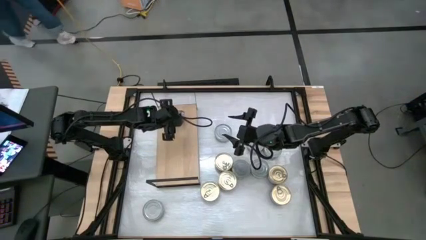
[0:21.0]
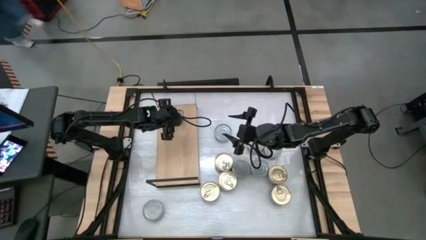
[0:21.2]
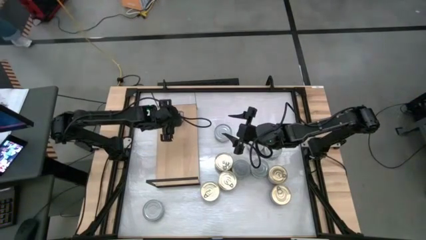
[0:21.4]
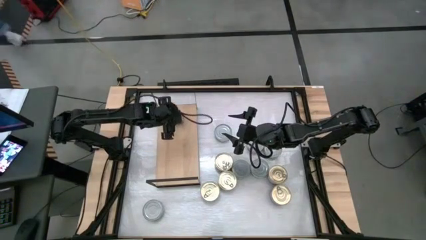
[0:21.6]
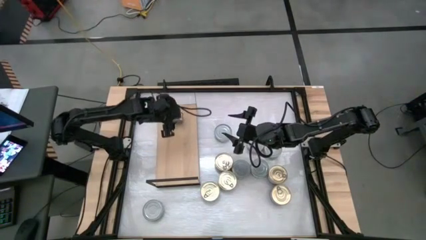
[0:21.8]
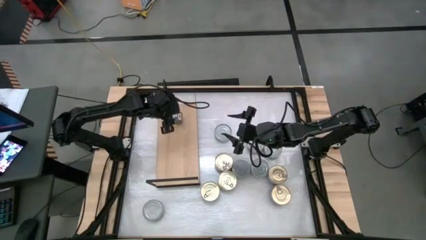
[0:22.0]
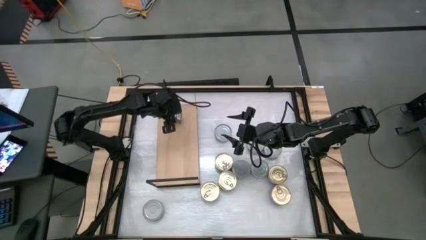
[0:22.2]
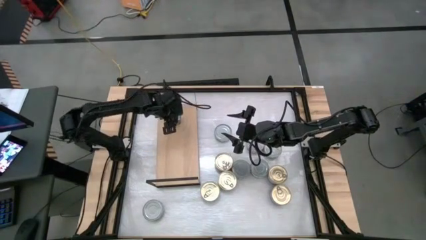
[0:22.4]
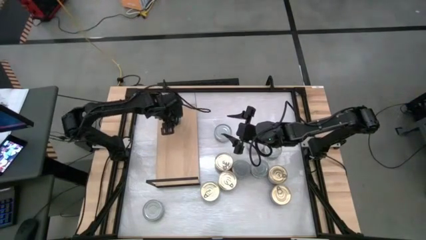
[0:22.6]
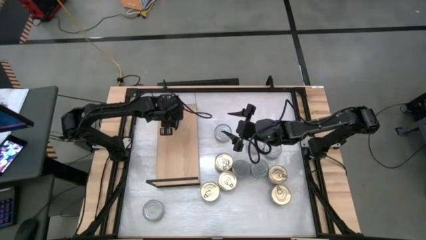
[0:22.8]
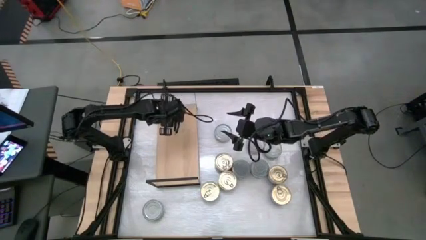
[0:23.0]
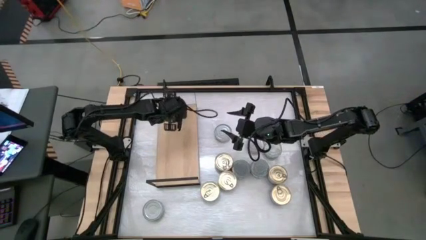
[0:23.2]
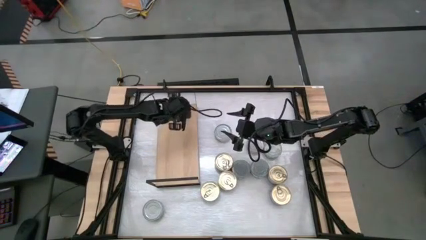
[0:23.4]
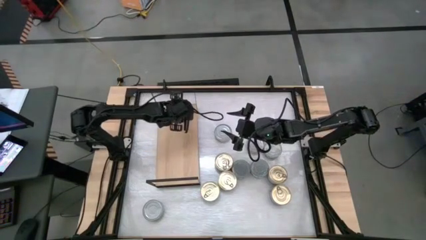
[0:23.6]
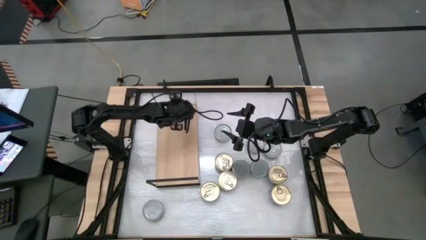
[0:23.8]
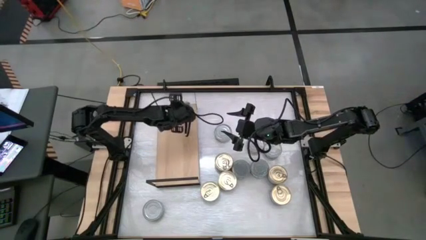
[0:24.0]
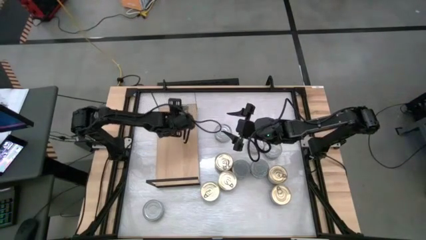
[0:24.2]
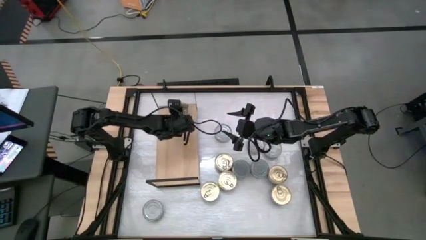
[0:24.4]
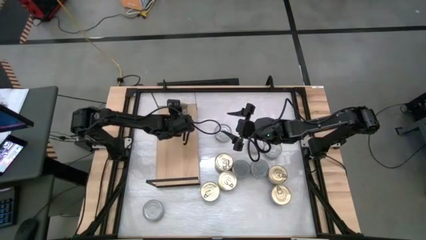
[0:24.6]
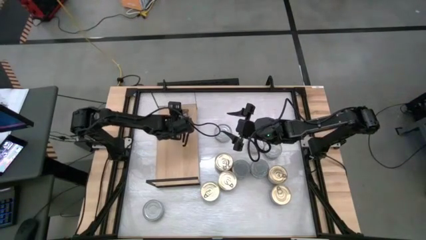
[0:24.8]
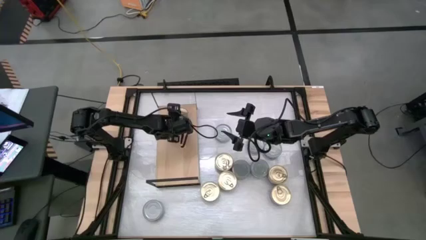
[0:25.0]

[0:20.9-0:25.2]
Task: Stack canned seafood by type on shelf
Put the blue-pink tuna can on the shelf

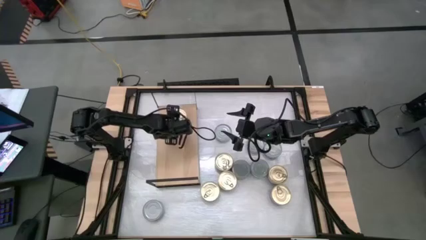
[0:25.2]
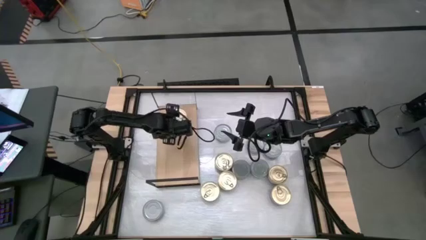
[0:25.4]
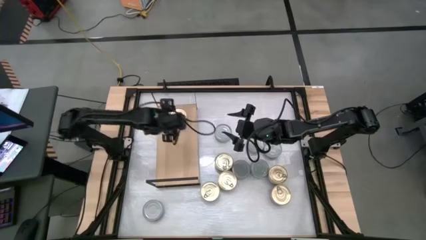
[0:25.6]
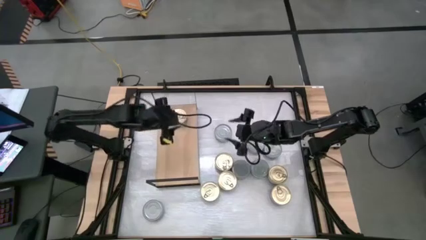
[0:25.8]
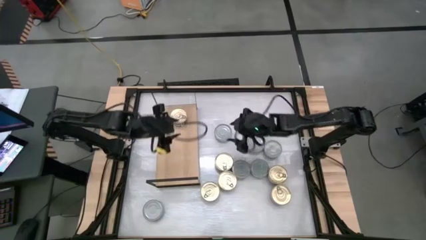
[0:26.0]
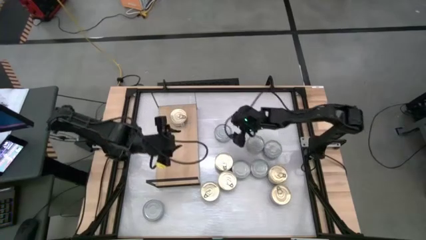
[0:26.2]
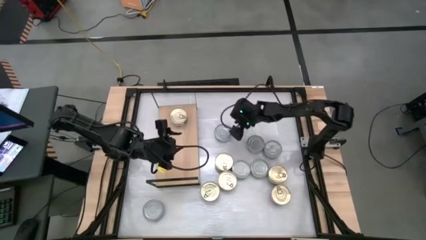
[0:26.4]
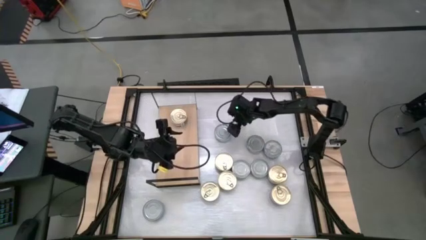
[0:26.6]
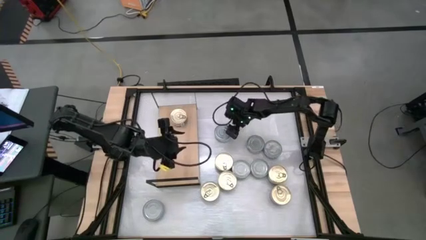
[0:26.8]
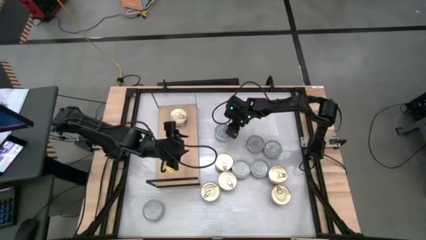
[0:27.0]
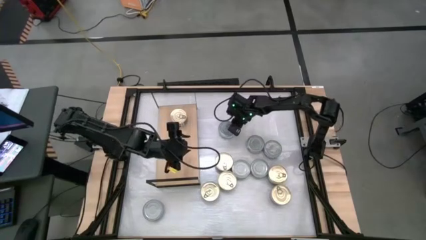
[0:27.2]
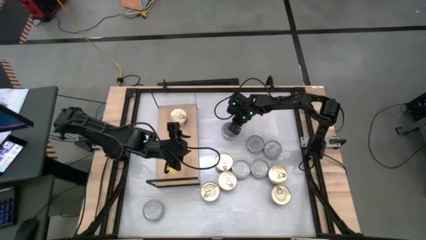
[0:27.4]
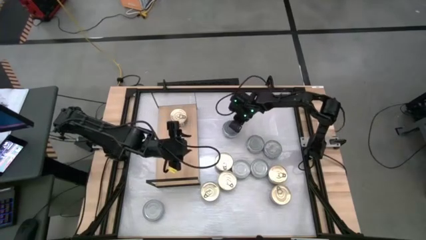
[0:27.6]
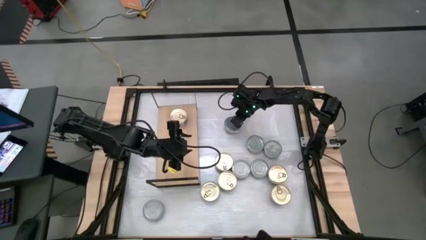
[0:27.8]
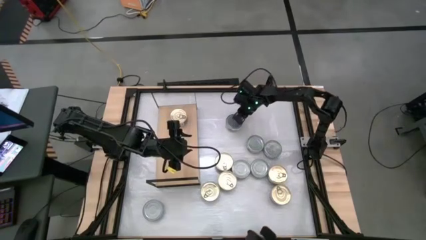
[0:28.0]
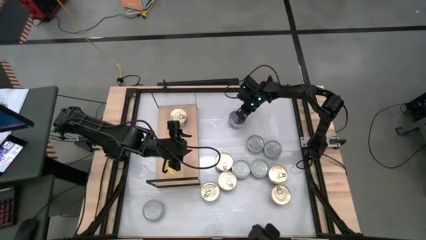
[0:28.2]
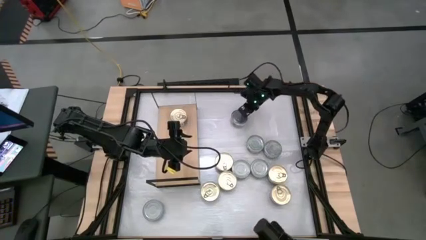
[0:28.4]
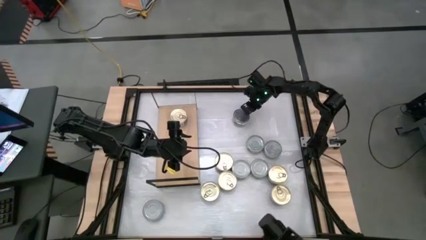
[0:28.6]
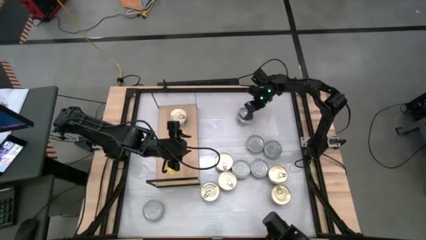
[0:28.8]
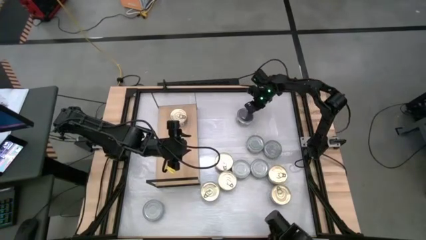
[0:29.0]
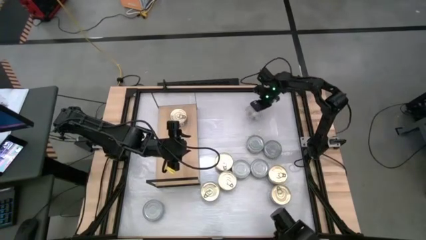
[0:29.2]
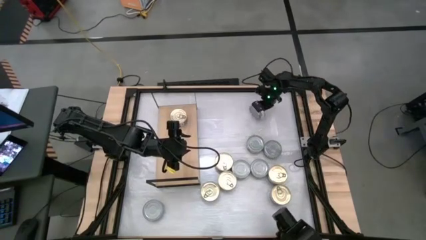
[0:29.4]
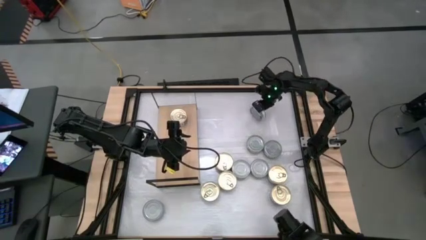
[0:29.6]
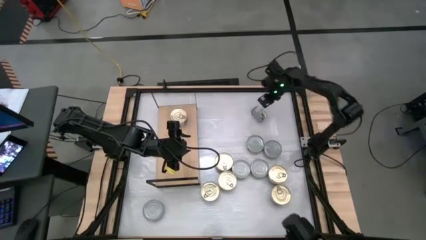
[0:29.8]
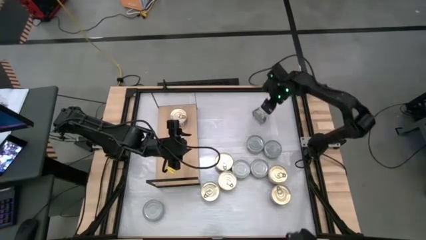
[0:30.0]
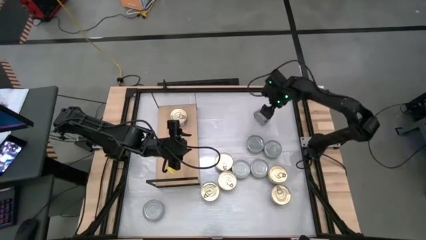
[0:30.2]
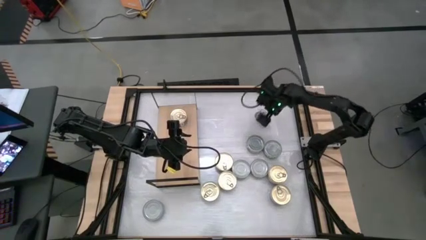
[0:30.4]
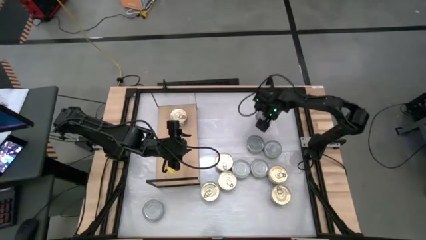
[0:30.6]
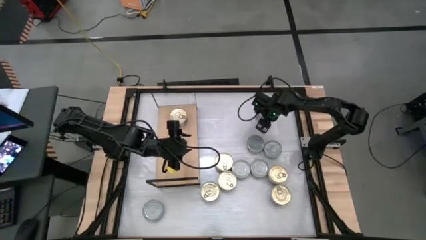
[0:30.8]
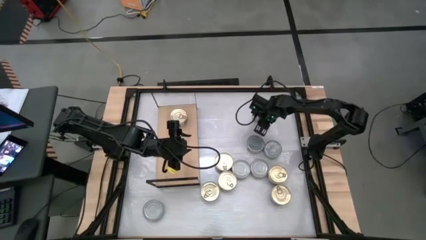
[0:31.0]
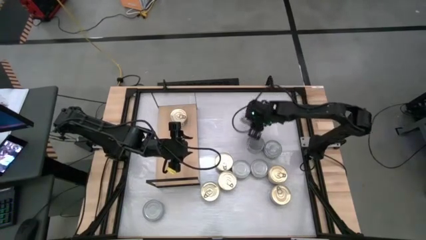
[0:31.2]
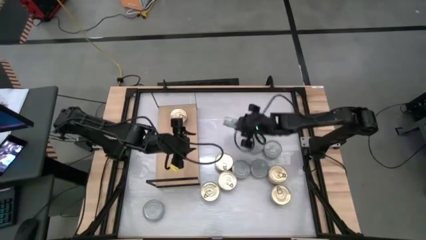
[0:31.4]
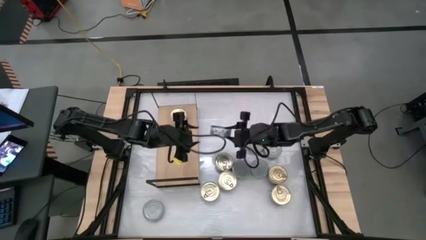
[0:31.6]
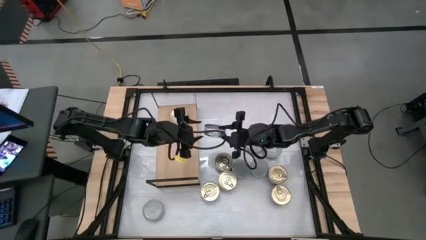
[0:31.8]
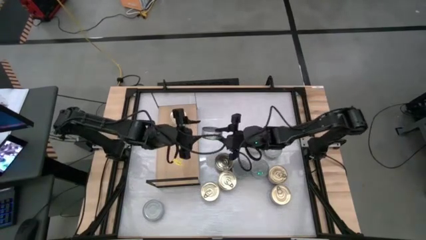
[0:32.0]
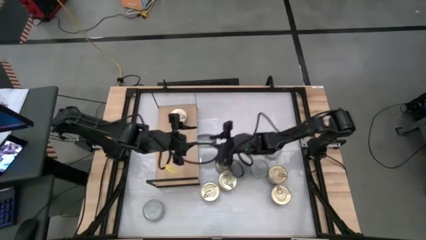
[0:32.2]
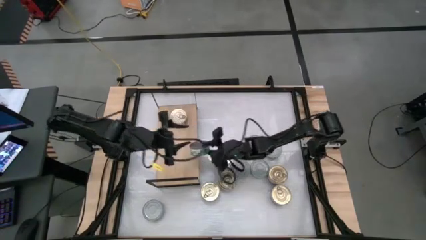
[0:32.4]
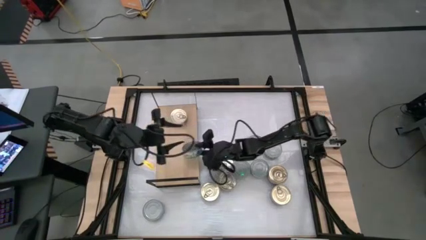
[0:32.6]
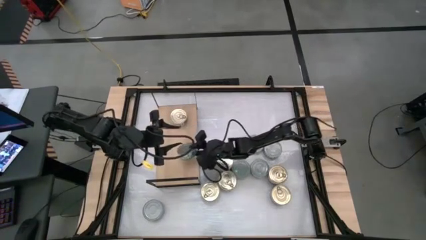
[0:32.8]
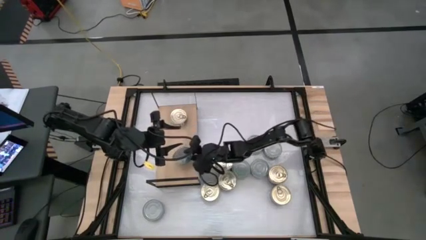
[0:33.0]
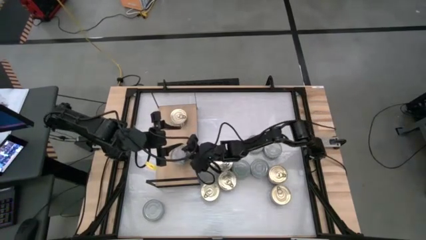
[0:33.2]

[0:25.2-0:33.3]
Put the green tuna can on the shelf

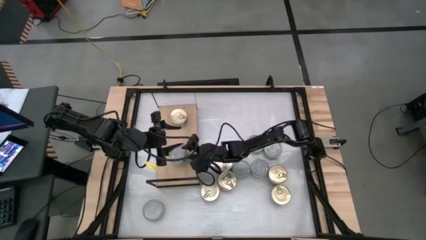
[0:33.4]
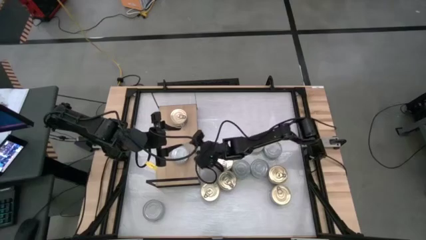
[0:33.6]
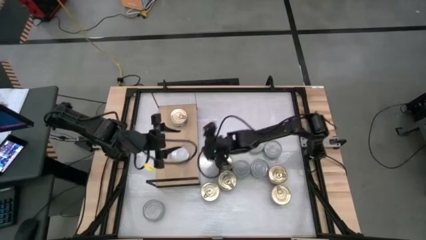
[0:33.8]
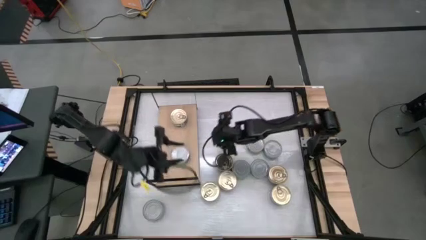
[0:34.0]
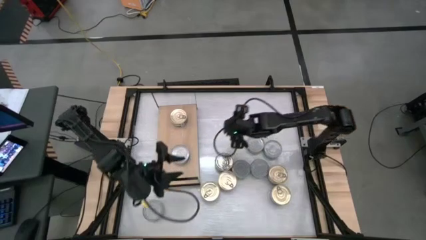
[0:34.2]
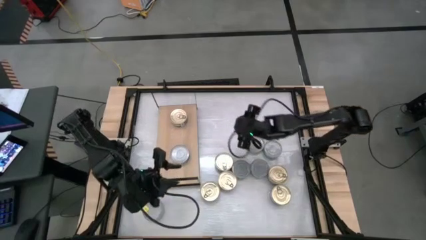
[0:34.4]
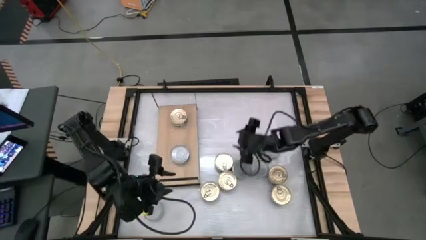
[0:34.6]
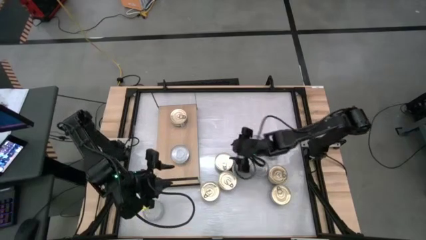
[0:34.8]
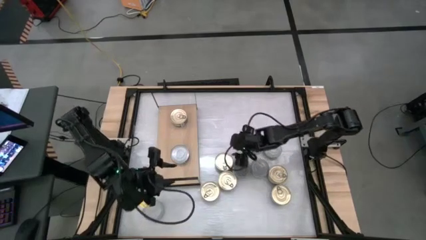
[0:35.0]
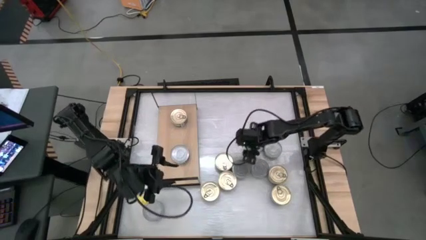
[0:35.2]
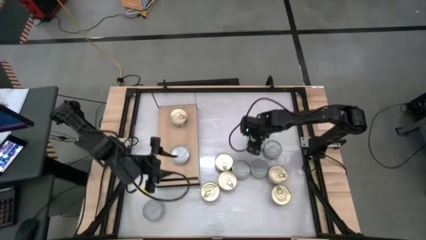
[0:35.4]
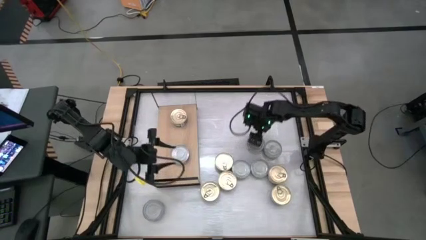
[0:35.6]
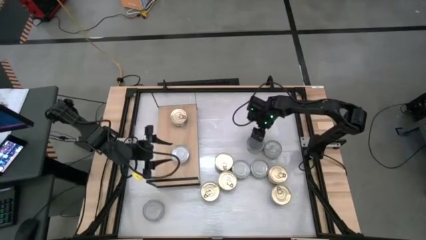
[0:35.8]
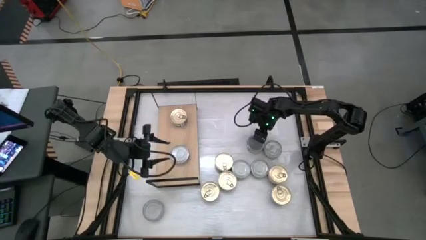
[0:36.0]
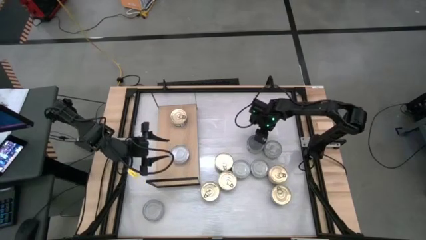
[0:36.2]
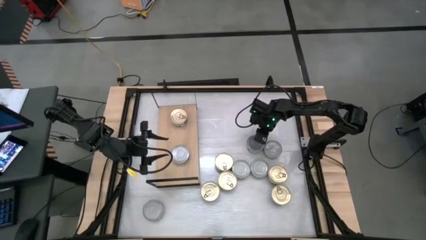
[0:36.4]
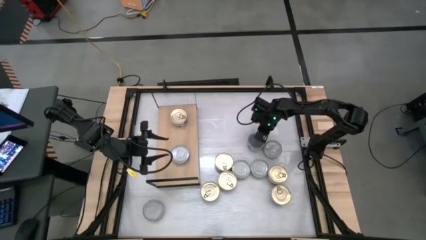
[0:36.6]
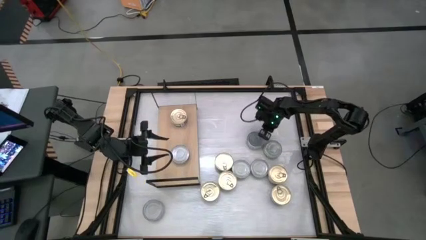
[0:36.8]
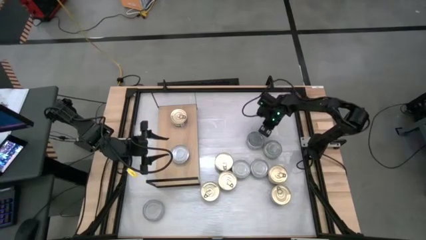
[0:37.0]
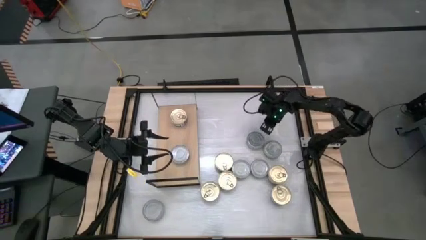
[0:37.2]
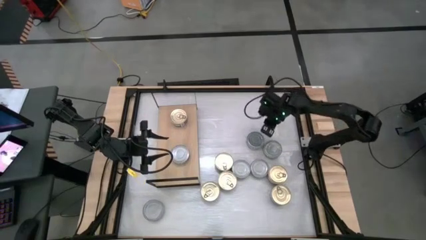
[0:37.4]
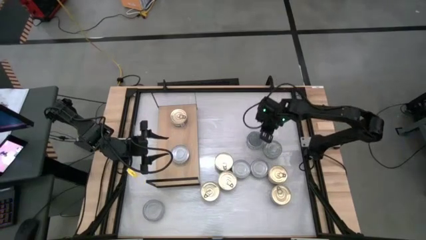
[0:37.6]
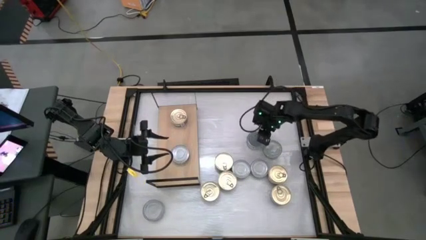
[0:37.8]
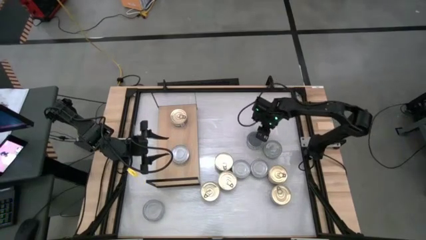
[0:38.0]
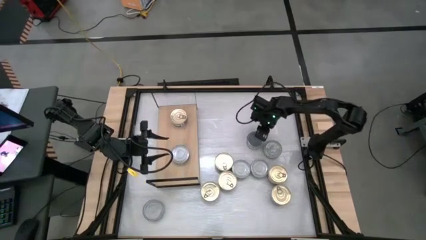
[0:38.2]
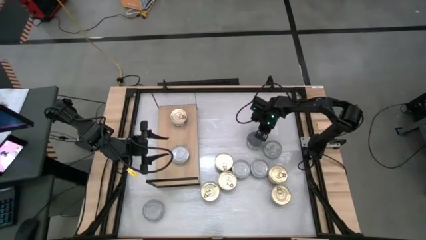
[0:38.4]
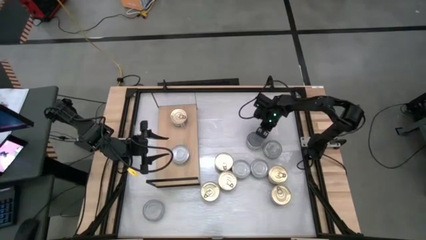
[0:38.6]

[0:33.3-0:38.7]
Stack the green tuna can on top of the other green tuna can on the shelf
